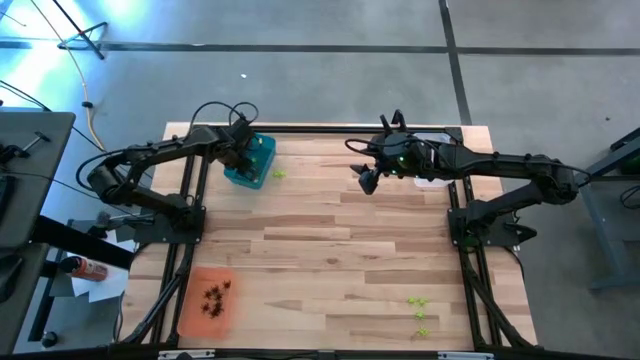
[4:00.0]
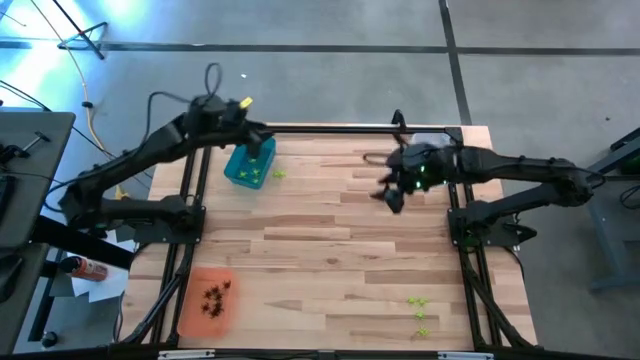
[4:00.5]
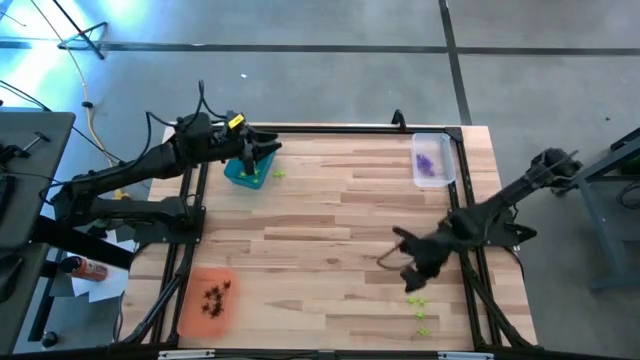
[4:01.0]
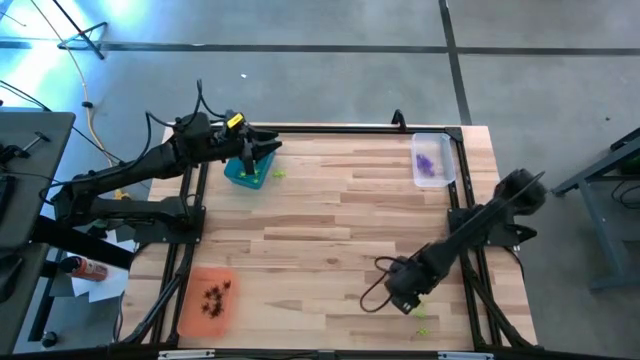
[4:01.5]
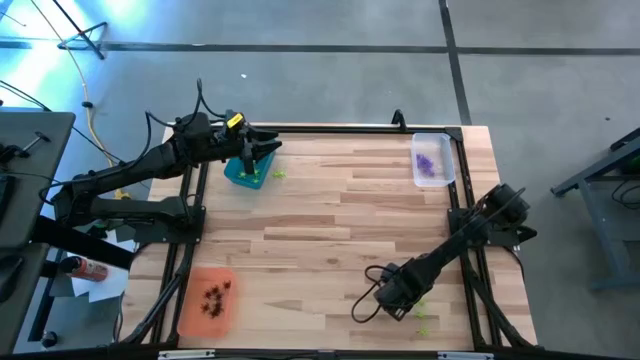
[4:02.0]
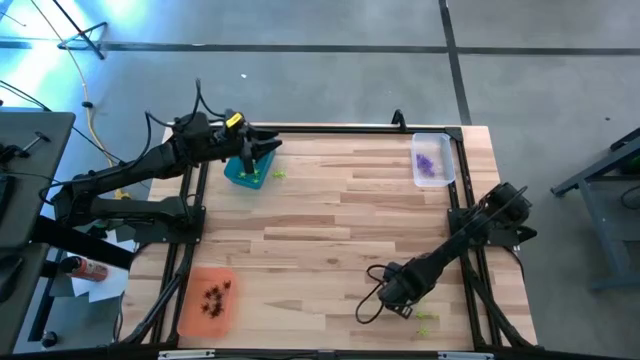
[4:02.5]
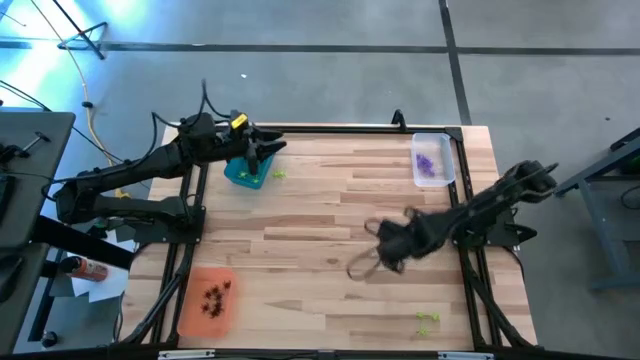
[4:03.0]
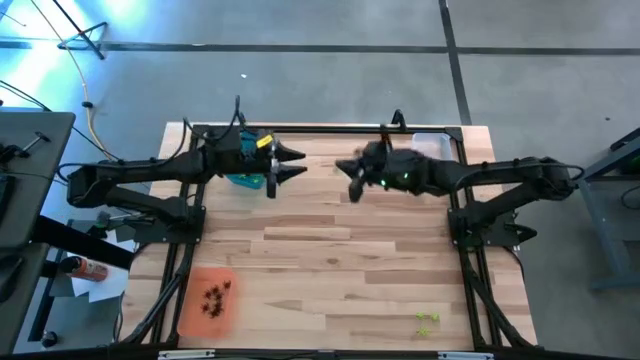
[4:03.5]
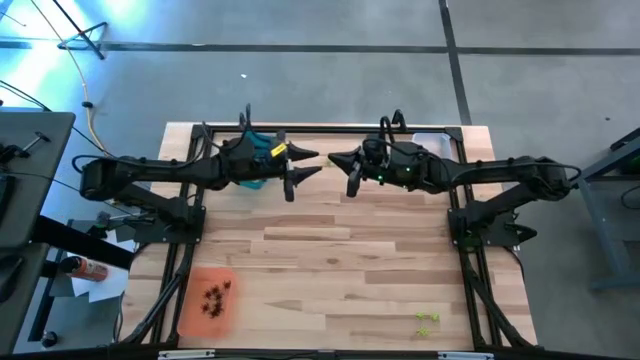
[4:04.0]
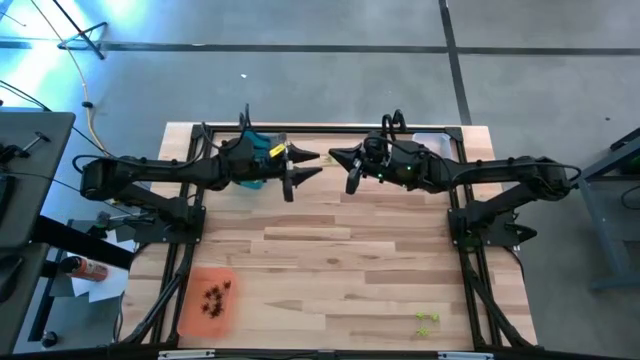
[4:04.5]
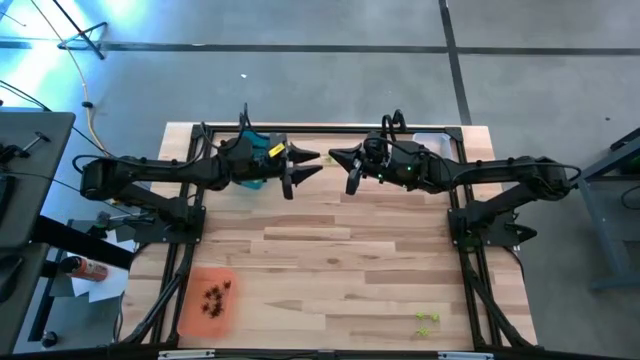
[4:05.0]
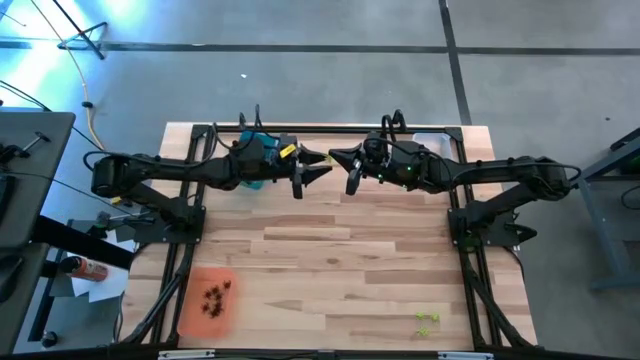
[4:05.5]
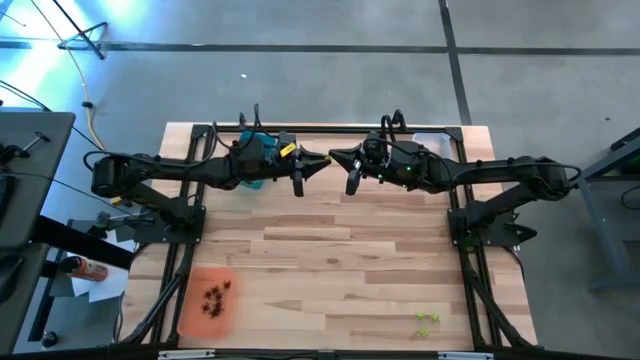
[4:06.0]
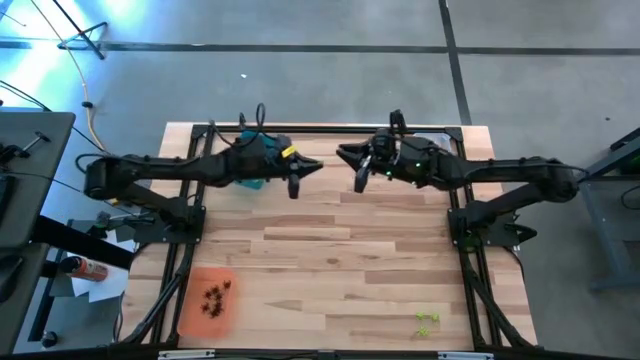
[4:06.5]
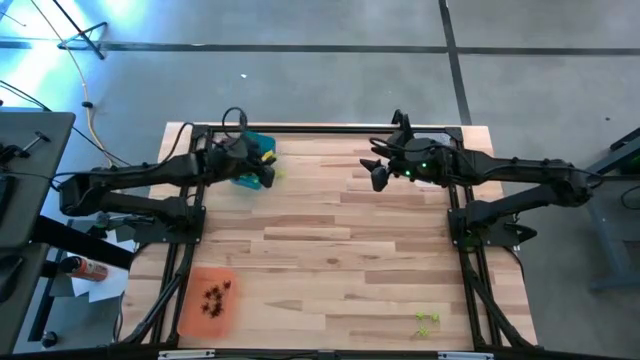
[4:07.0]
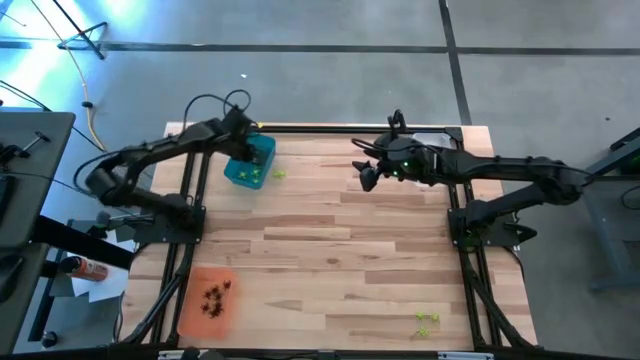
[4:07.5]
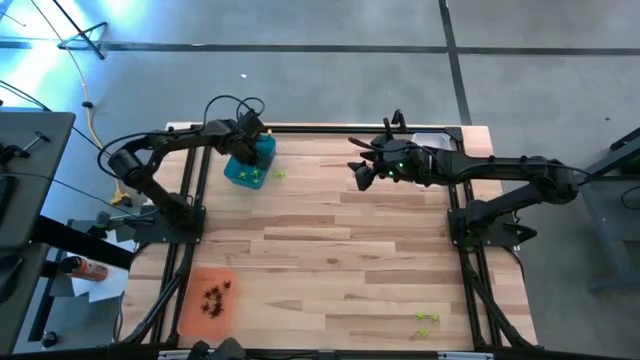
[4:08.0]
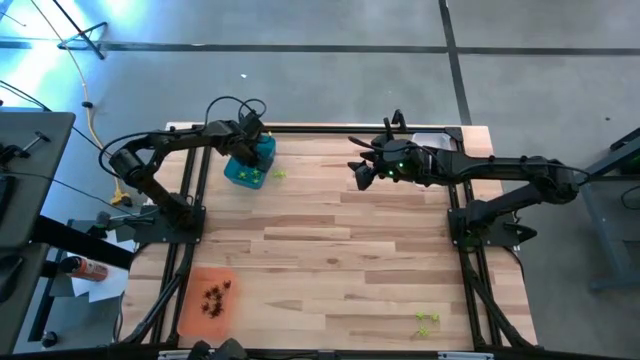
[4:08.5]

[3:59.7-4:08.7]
Task: Sort Halloween decoration
Put the green spider toy into the blue bin

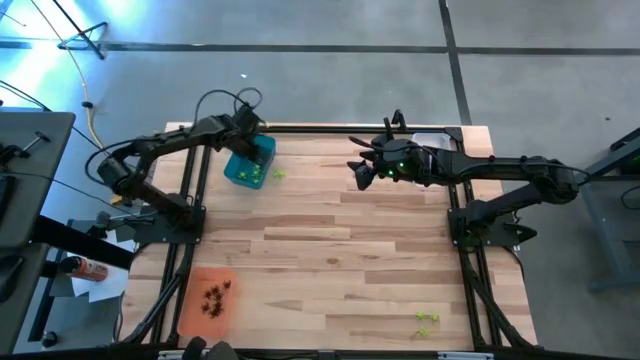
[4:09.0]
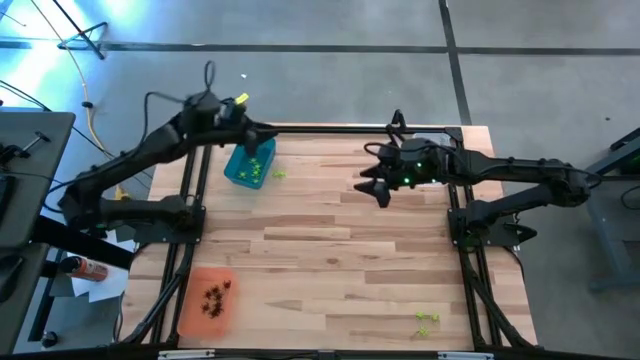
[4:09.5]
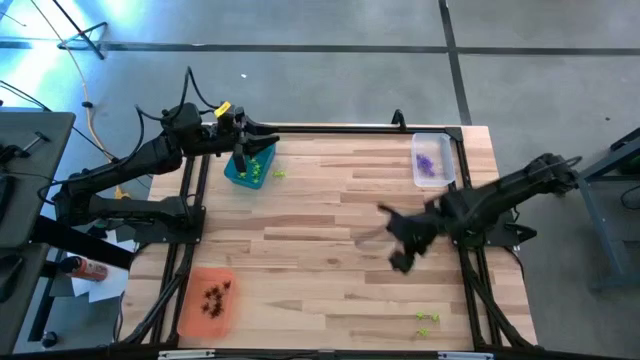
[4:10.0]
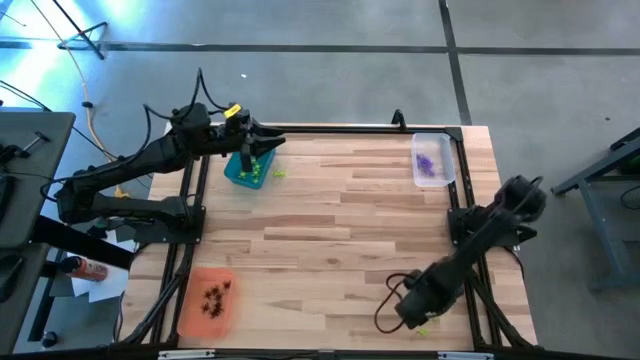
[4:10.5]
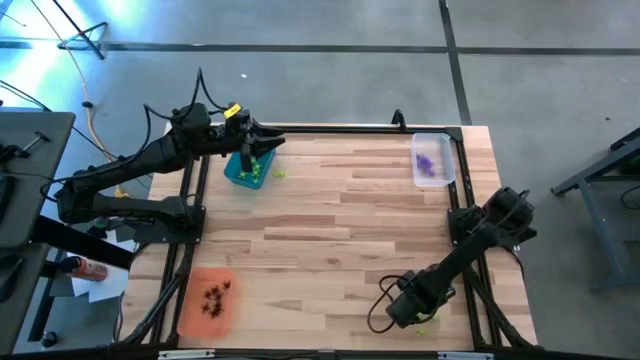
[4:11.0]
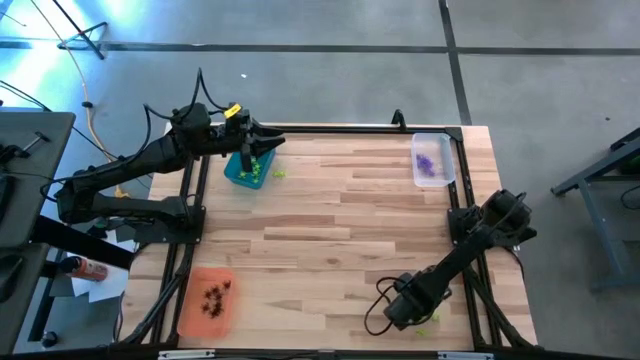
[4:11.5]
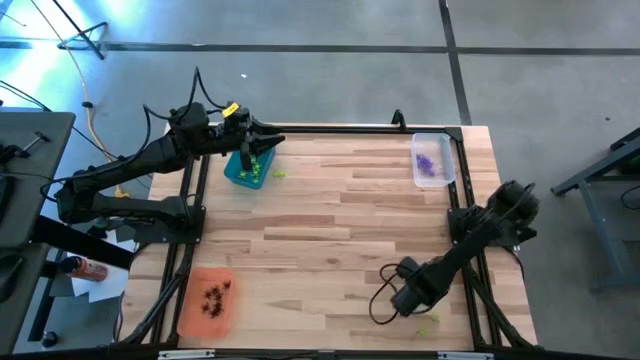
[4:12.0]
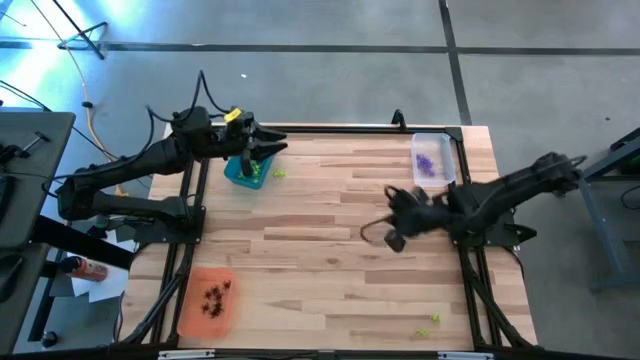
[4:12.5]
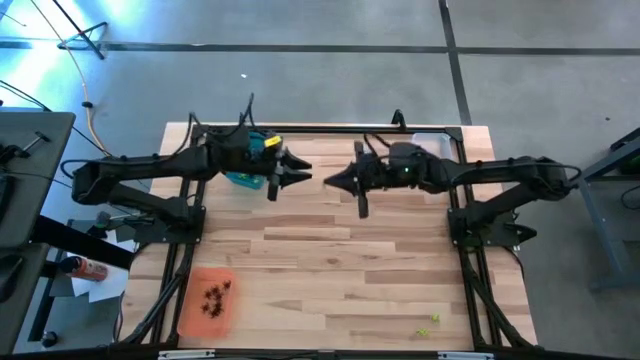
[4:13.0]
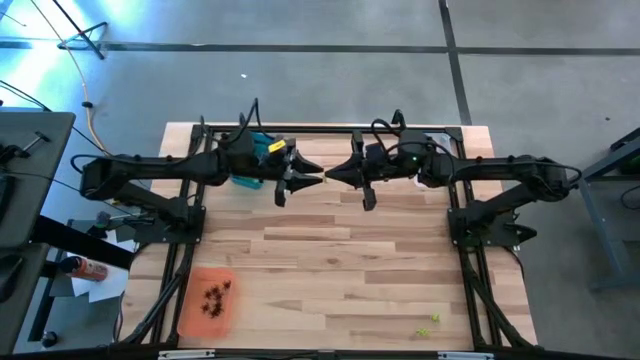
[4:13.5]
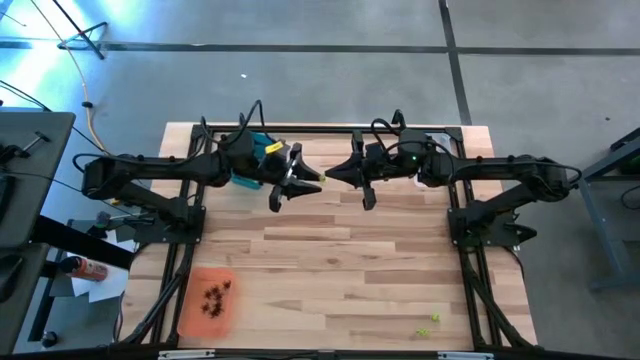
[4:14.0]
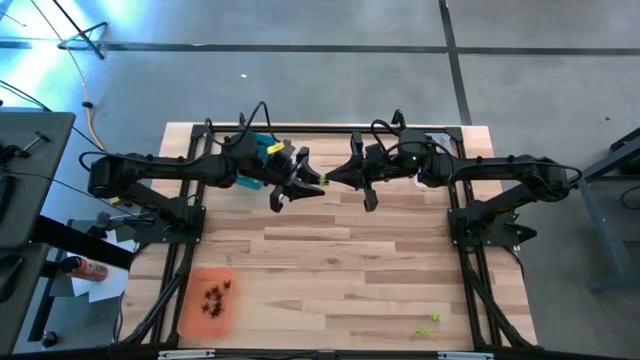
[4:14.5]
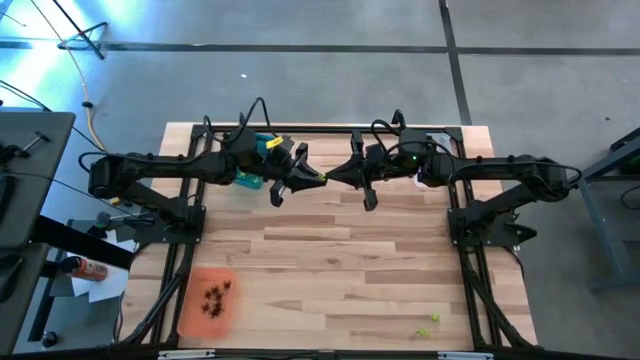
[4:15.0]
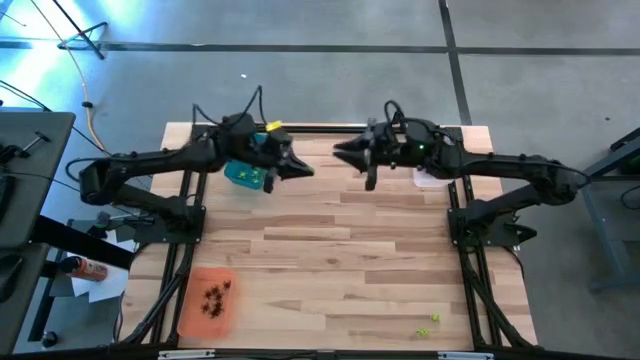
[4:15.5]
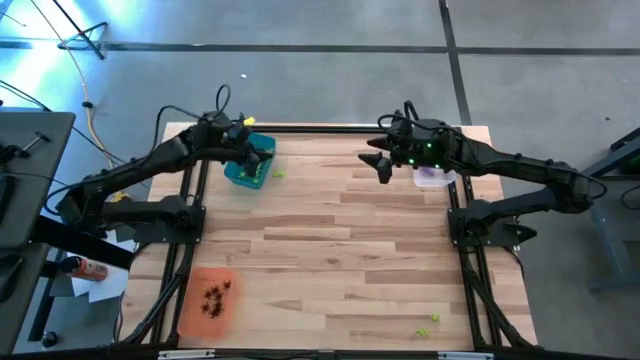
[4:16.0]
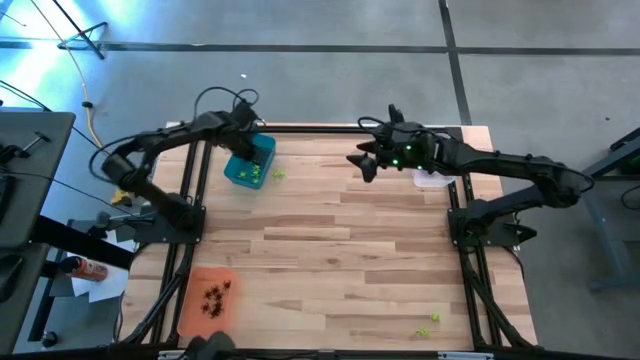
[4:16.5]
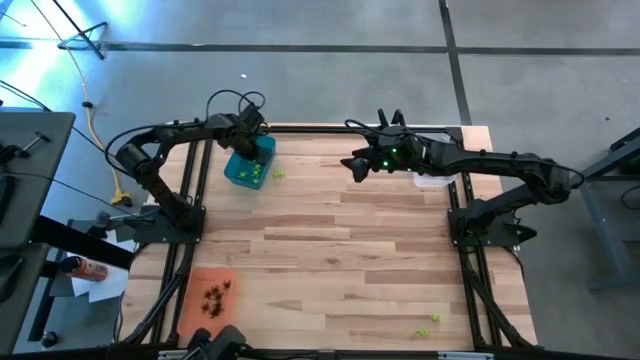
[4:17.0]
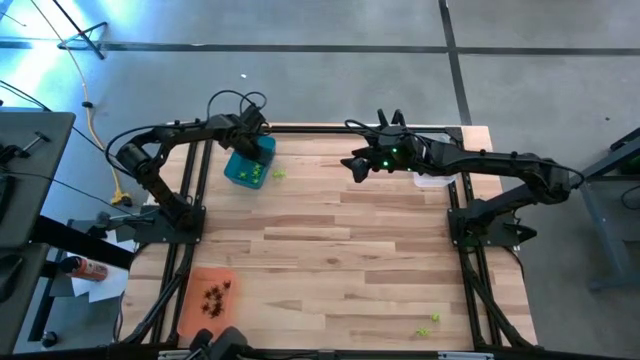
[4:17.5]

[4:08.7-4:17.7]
Put the green spider toy into the blue bin

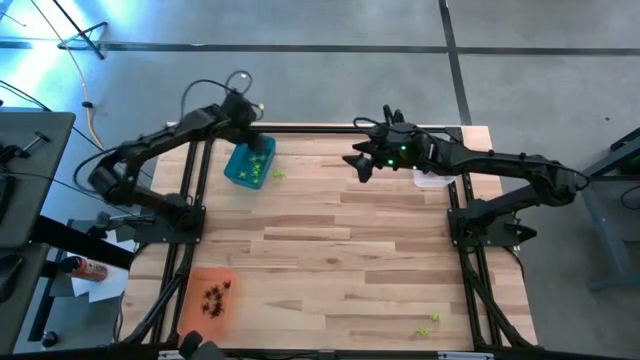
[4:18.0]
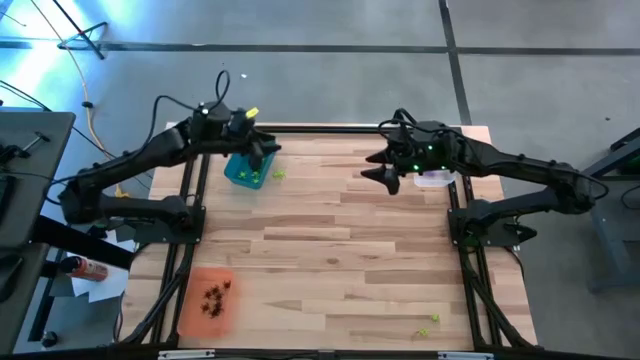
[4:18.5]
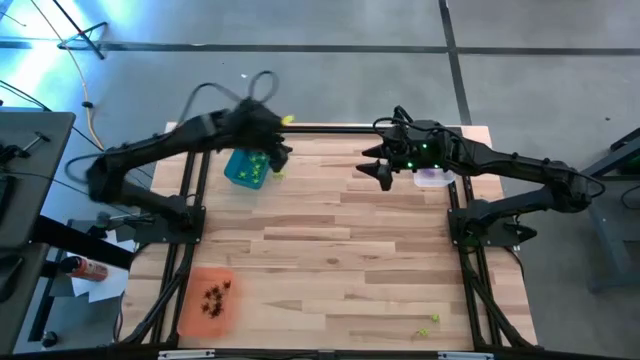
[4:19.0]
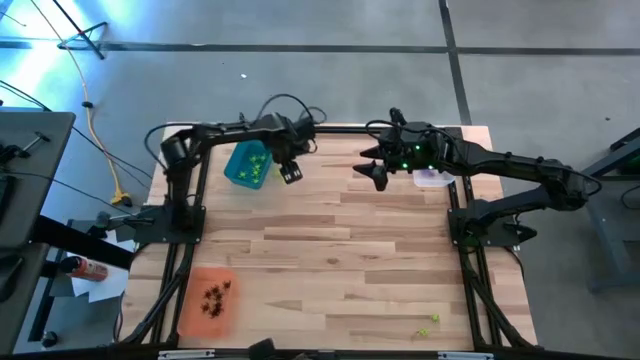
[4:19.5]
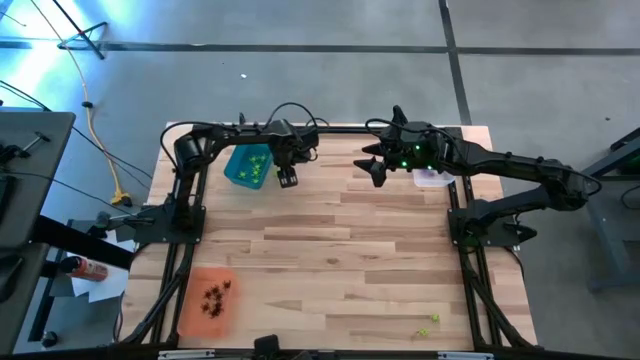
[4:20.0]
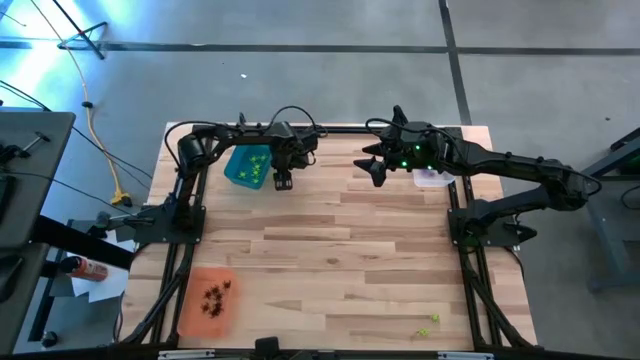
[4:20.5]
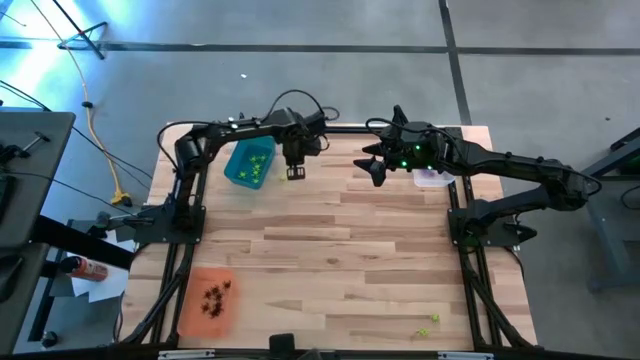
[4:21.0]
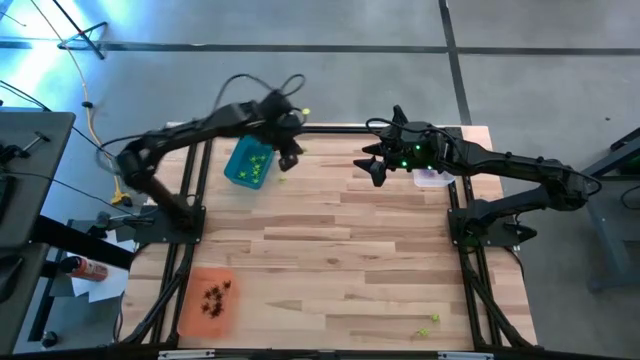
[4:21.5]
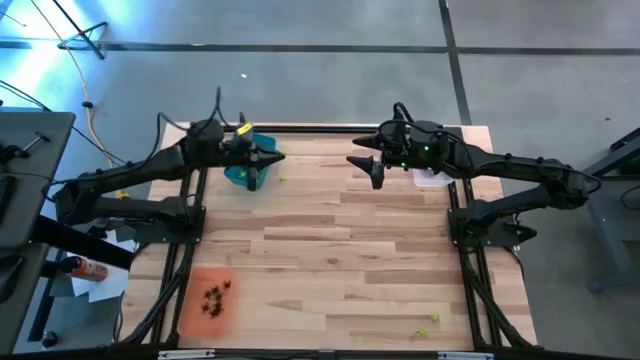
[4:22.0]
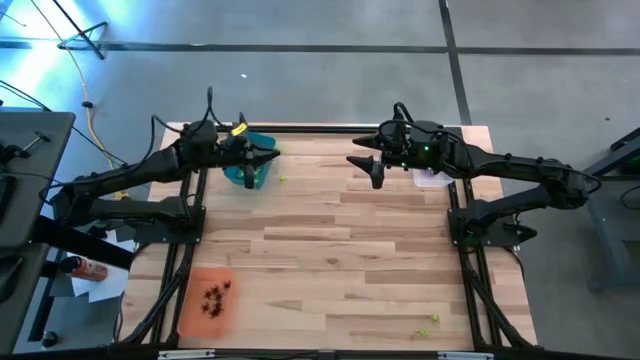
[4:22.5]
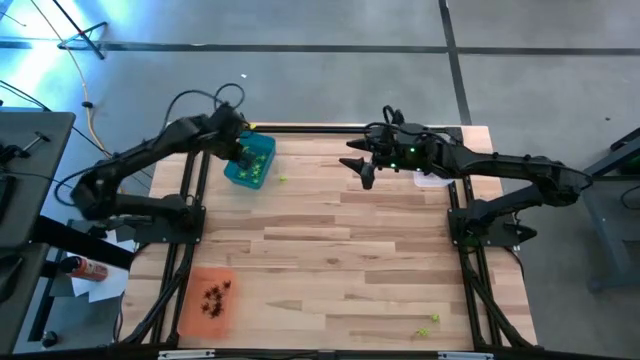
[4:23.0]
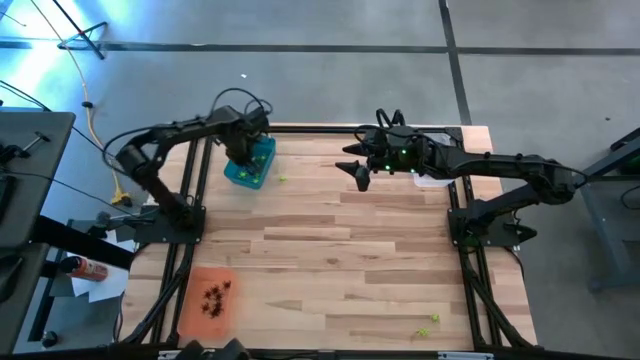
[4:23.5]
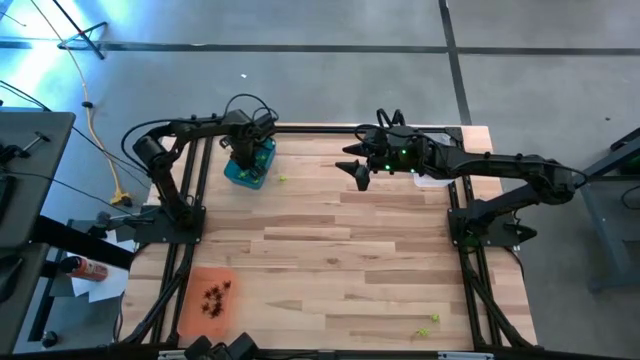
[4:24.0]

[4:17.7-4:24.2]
Put the green spider toy into the blue bin
